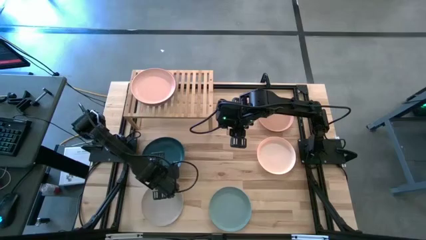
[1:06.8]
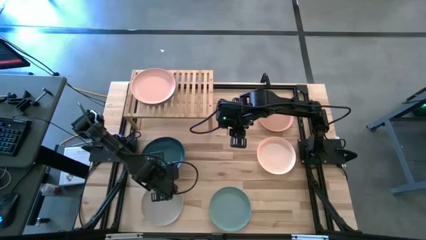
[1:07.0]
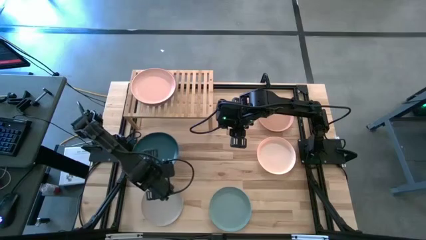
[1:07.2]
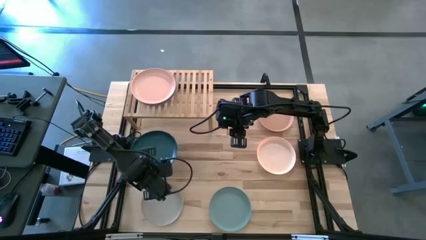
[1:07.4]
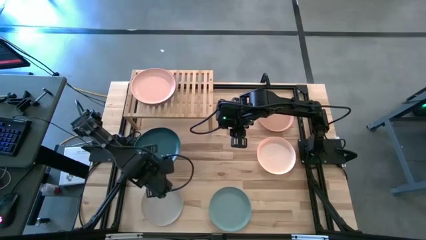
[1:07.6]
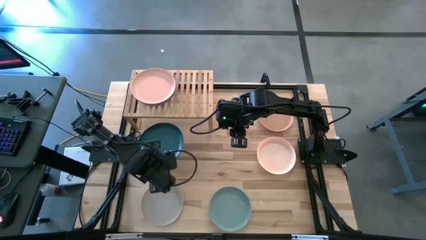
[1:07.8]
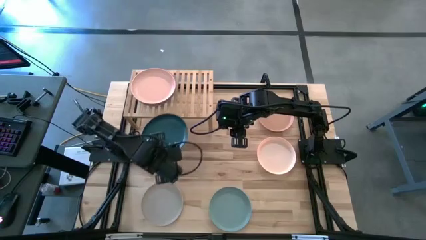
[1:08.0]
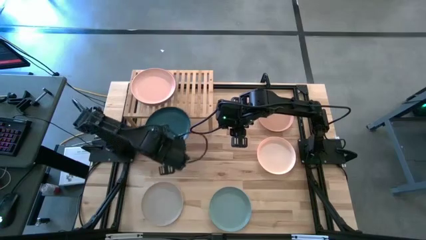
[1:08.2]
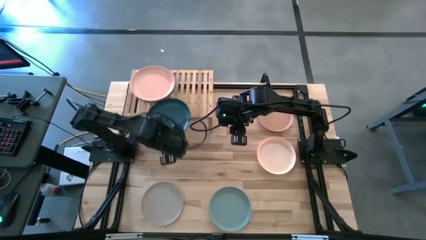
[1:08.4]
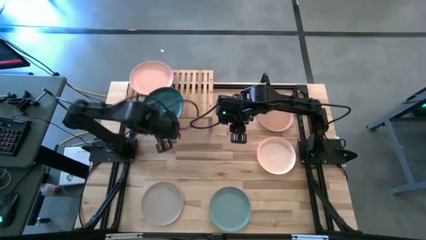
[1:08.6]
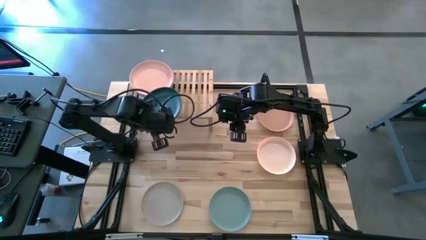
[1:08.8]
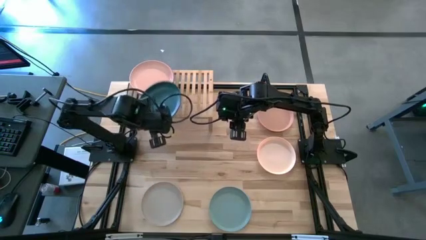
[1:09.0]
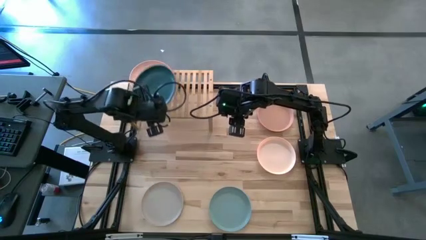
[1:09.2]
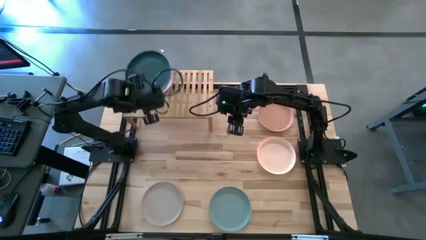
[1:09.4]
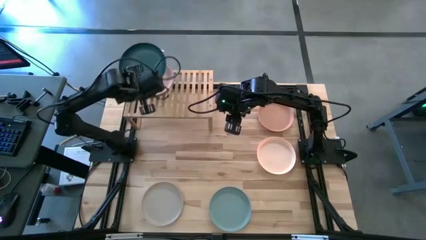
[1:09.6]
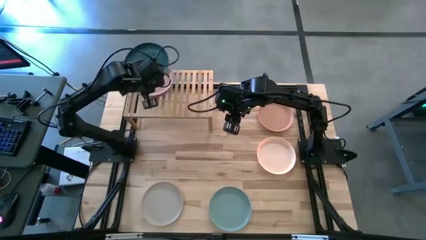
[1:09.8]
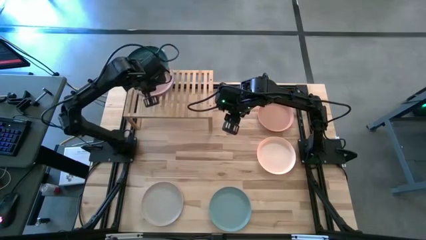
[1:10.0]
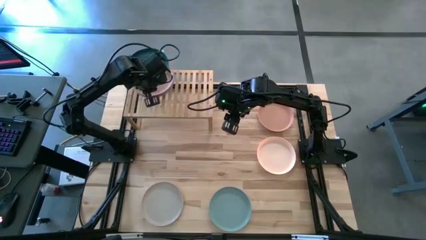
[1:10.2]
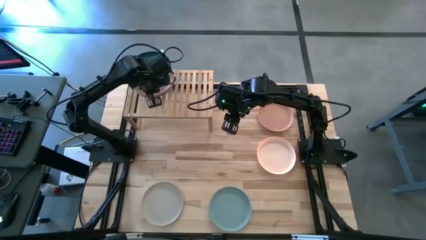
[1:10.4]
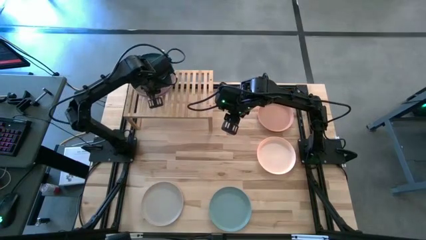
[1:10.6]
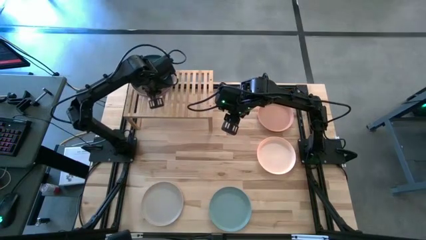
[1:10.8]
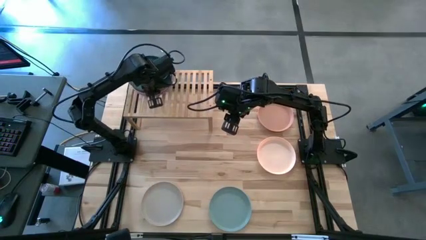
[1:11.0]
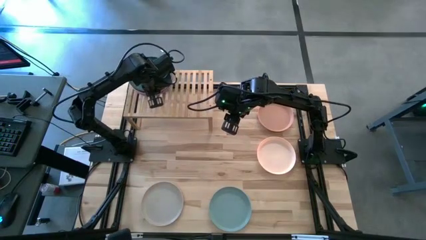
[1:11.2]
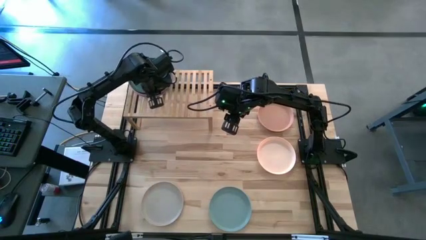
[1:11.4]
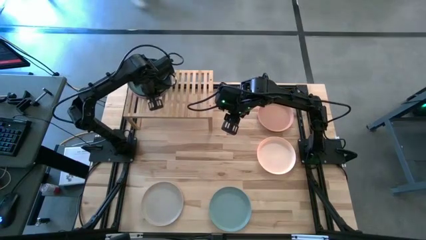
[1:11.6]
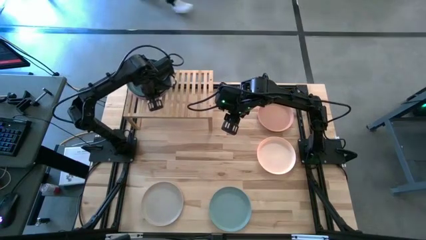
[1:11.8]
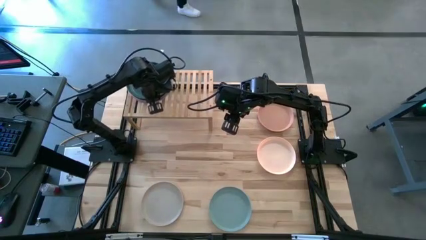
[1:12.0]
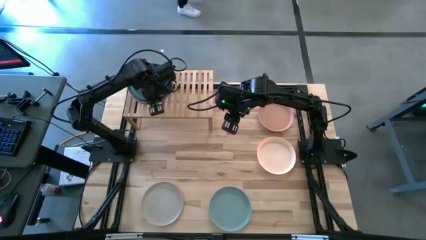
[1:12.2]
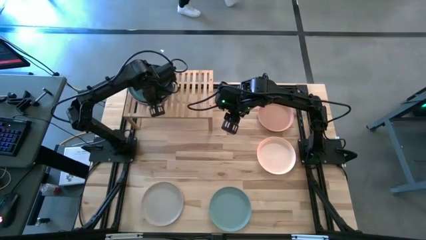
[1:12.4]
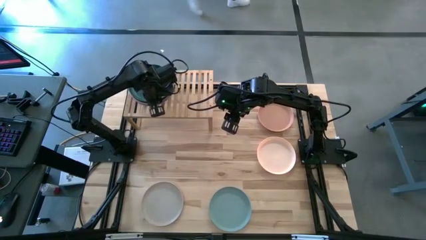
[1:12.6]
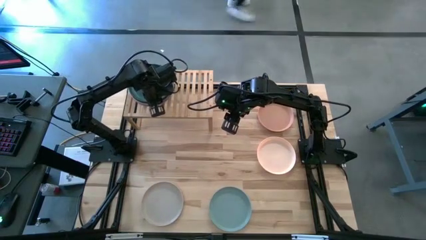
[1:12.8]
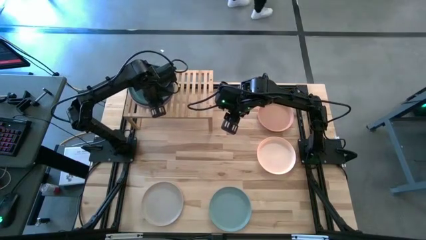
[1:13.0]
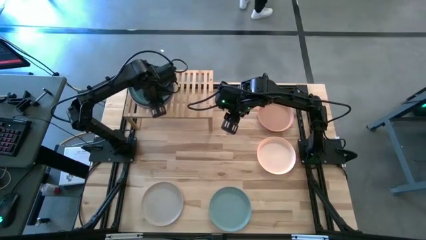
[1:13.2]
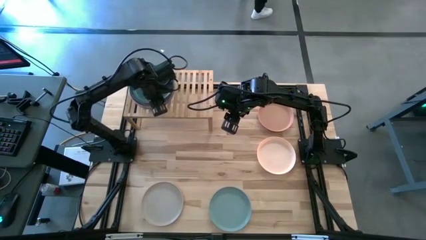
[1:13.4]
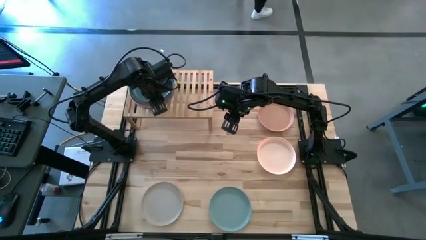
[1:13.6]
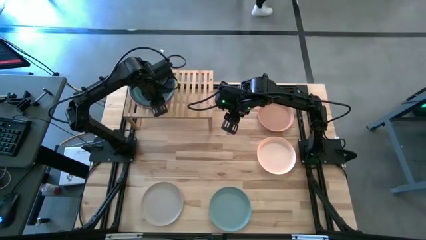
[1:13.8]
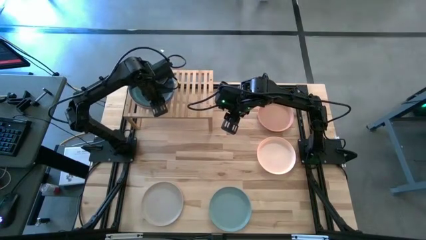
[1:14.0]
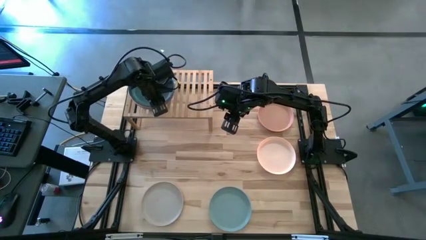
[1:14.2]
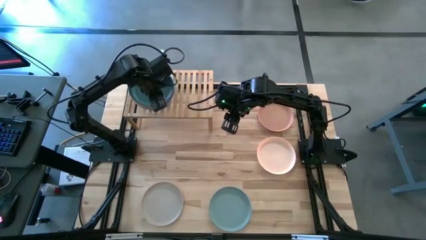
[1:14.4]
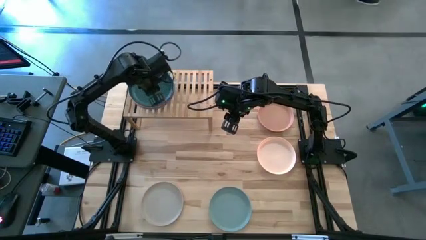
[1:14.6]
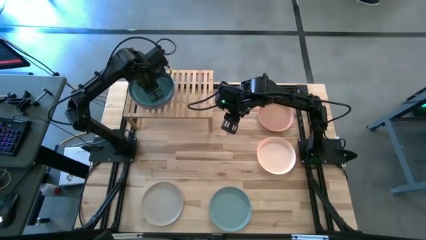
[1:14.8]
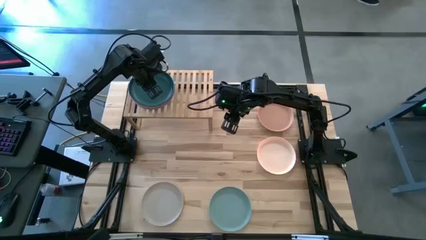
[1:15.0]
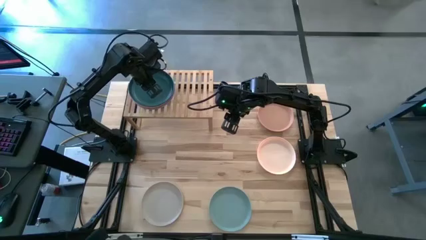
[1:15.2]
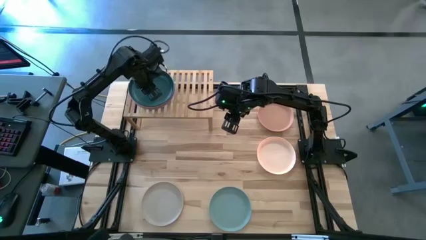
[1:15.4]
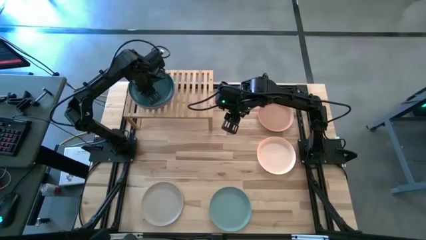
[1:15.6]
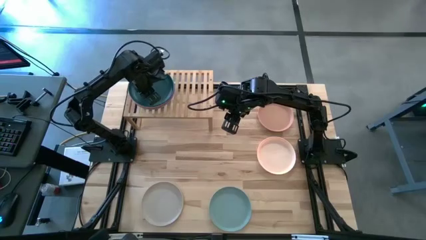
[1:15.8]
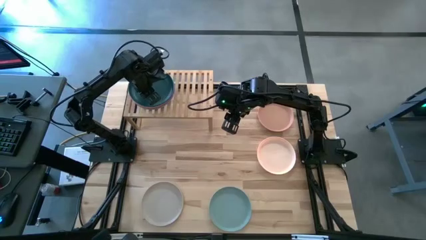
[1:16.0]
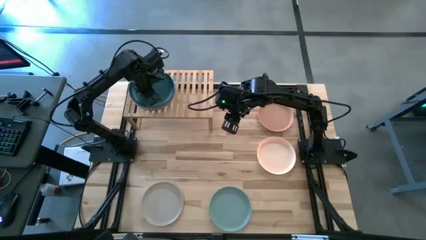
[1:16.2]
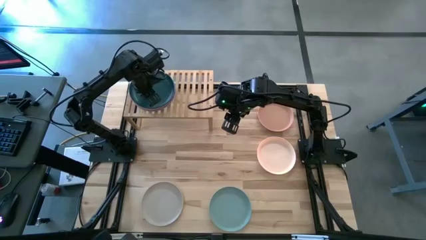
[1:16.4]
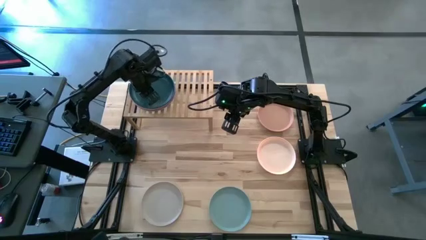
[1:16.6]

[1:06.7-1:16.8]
Task: Place and stack plates onto a shelf
Stack the green plate on the top of the light pink plate
